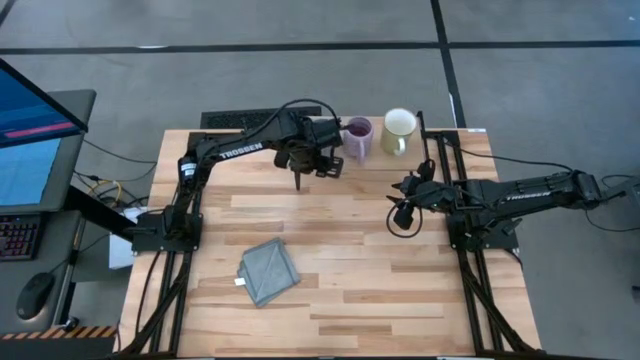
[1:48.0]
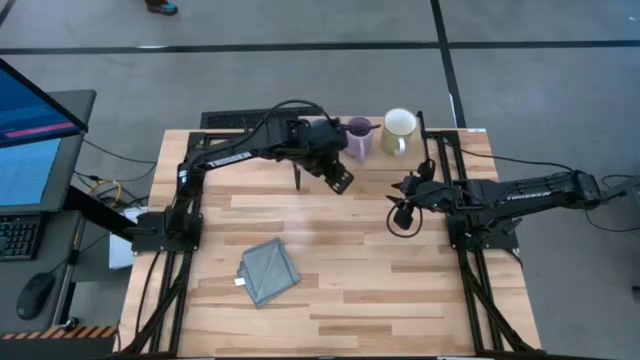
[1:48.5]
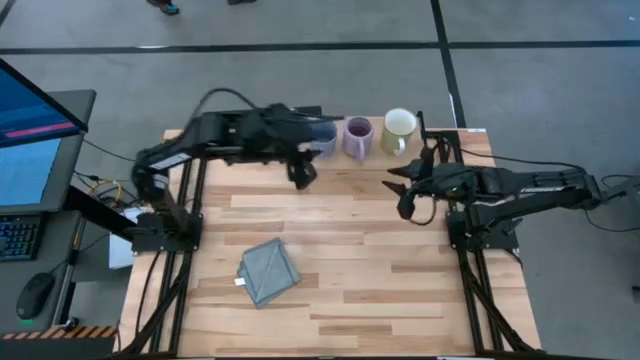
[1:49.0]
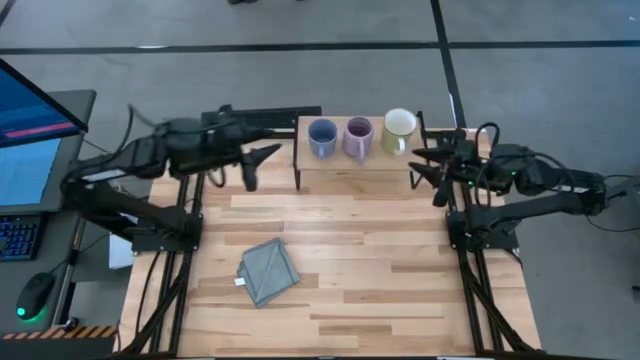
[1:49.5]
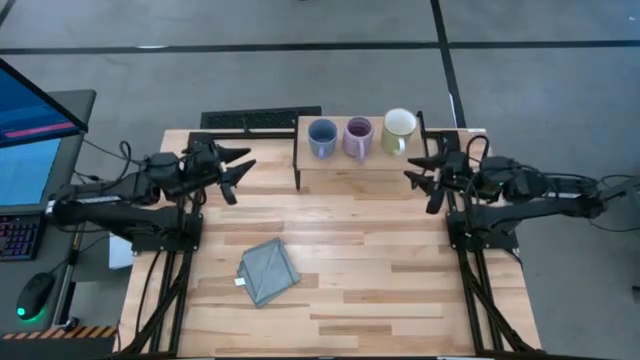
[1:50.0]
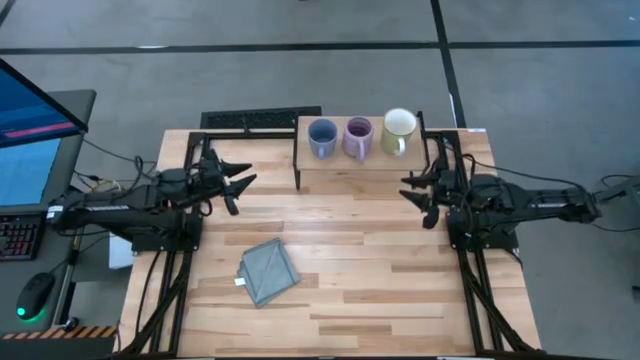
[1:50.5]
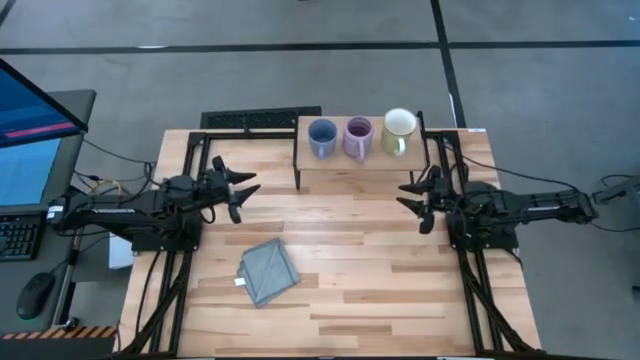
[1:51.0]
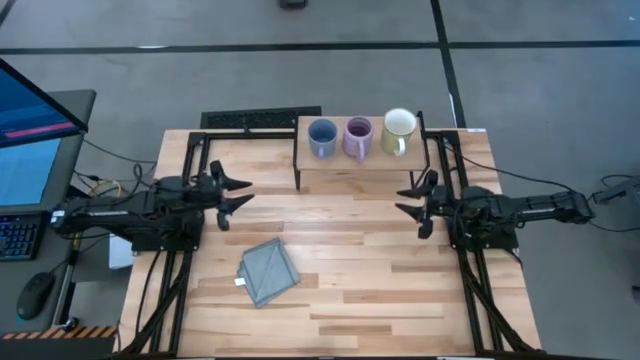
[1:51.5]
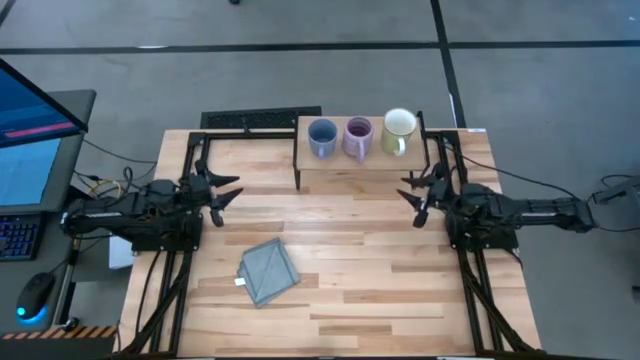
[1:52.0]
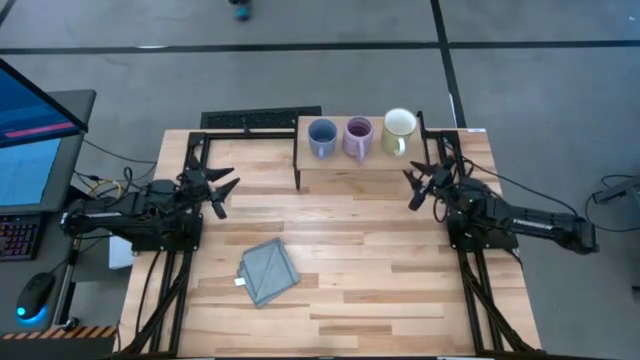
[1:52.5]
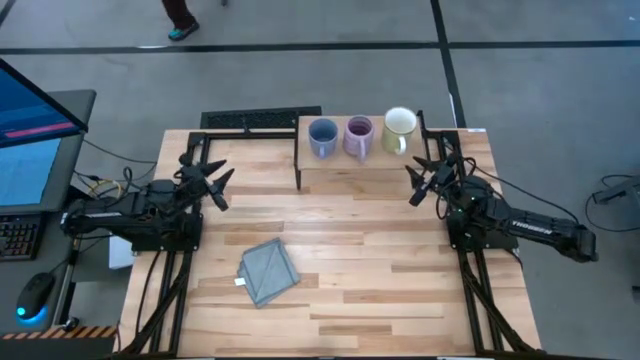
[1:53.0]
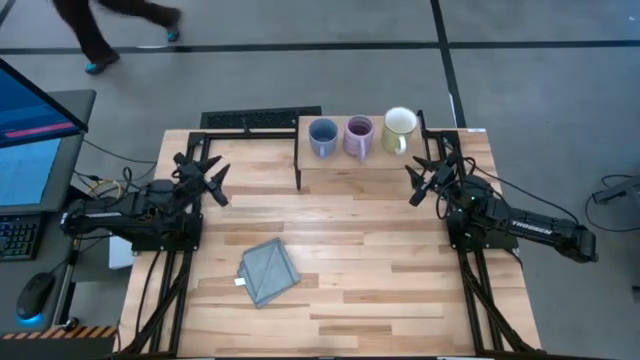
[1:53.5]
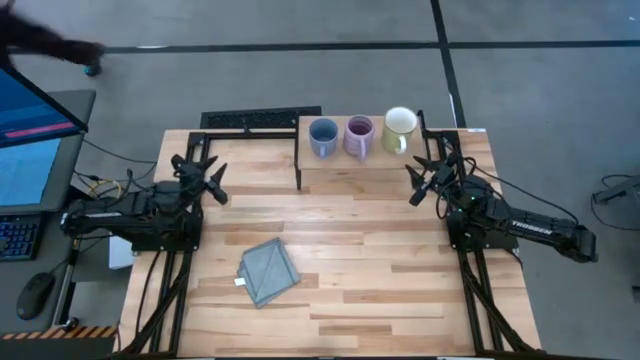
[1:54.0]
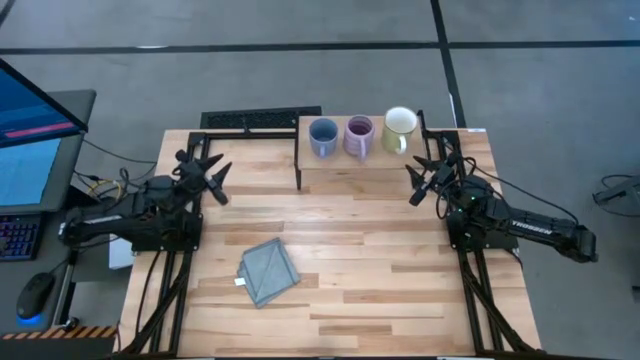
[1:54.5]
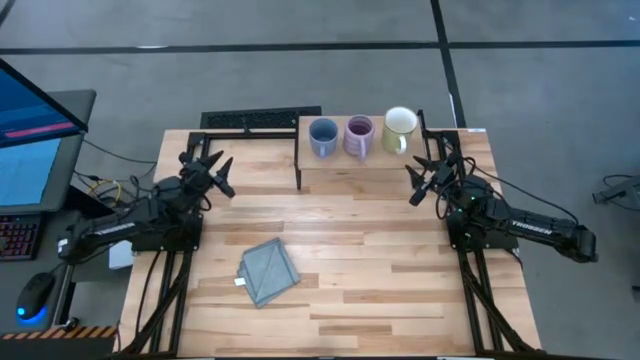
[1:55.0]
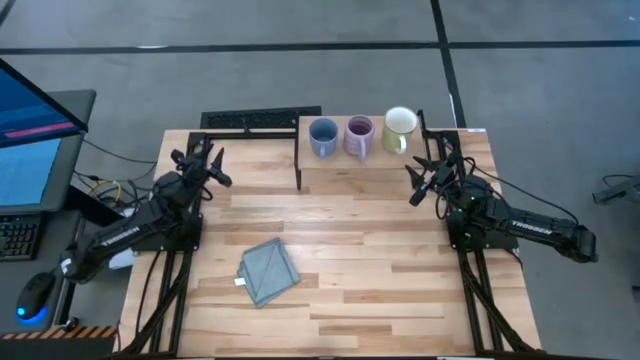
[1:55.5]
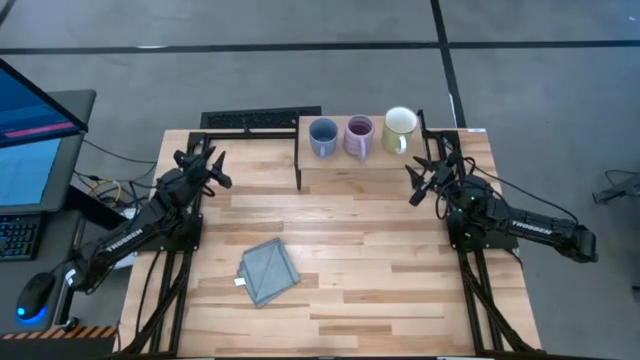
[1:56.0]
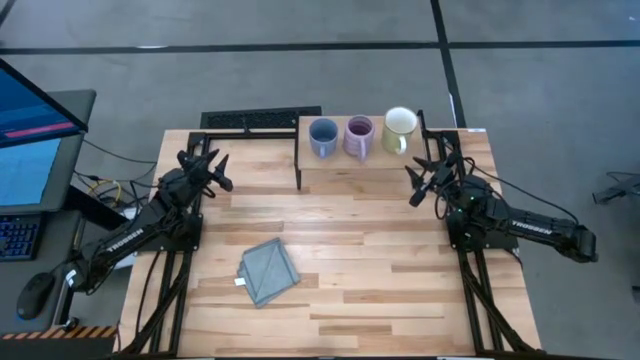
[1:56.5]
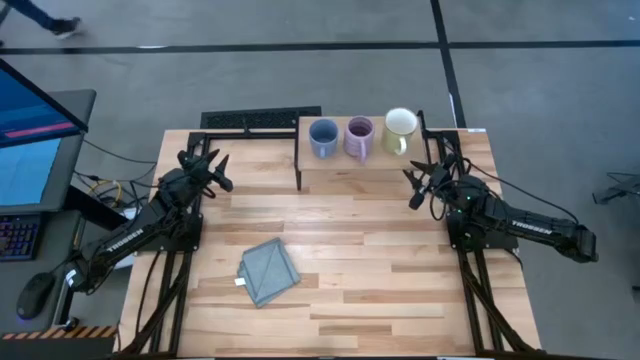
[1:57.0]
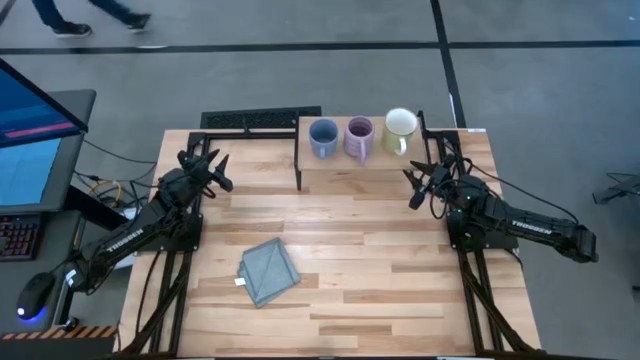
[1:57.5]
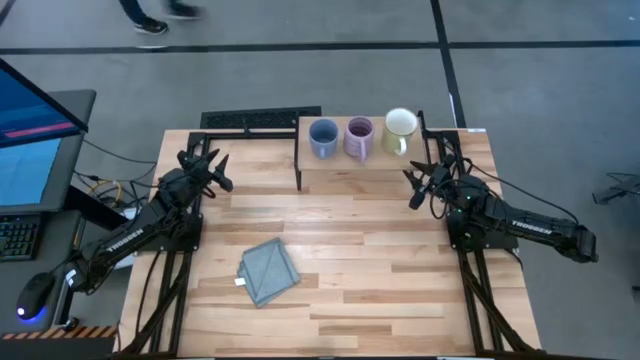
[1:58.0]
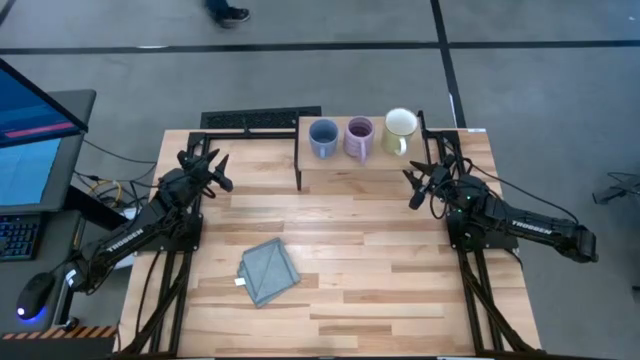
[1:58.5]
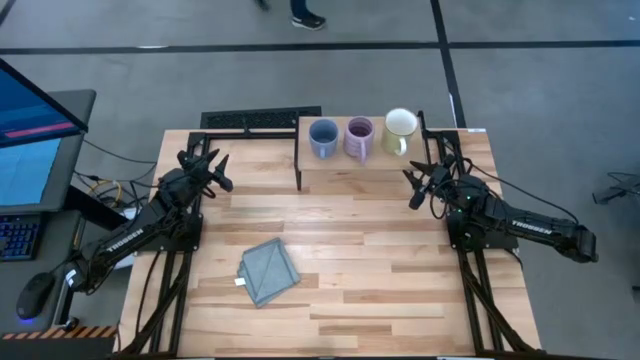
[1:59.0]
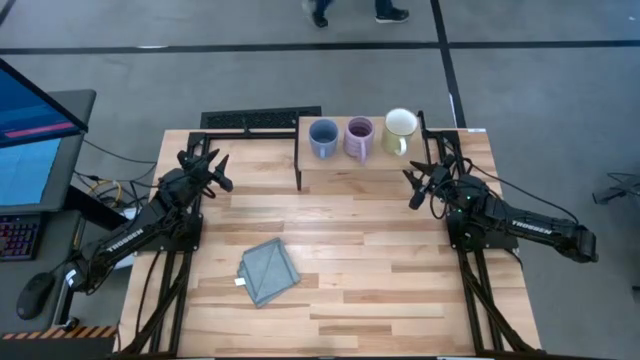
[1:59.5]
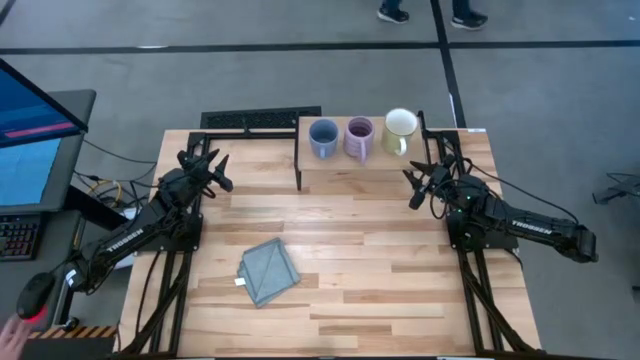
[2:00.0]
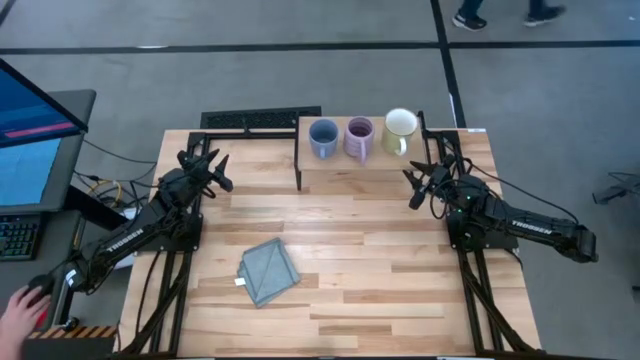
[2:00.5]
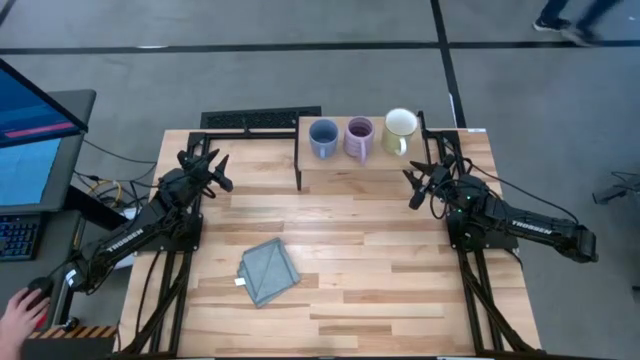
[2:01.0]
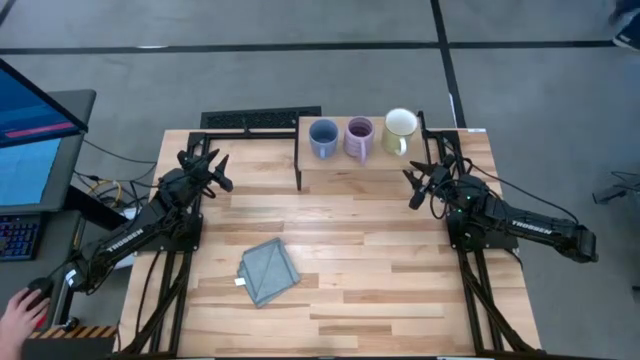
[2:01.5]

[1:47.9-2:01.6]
Task: Stack small to large cups/mugs on shelf
Return to Home Position

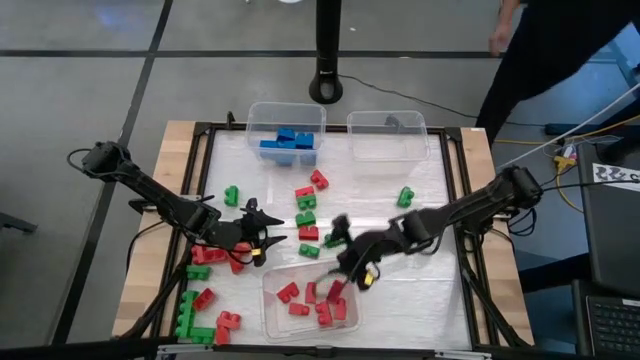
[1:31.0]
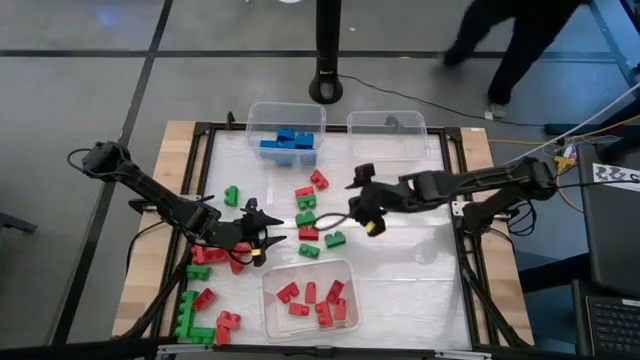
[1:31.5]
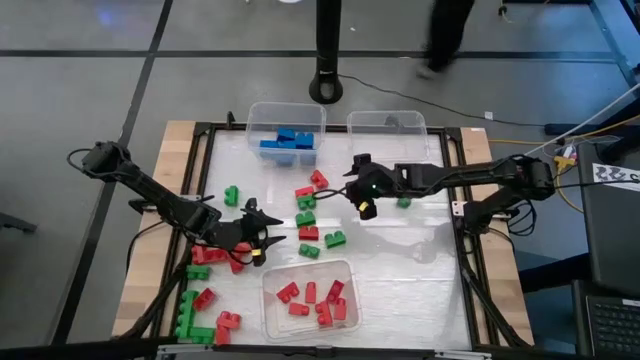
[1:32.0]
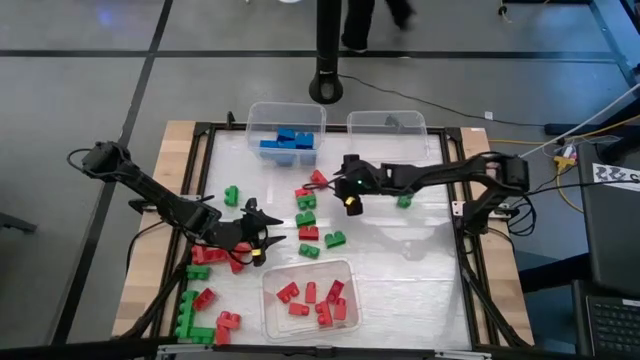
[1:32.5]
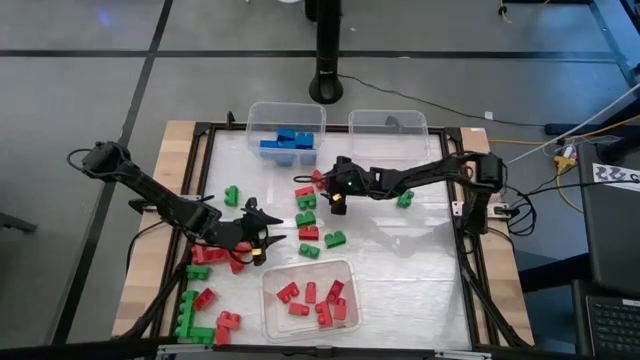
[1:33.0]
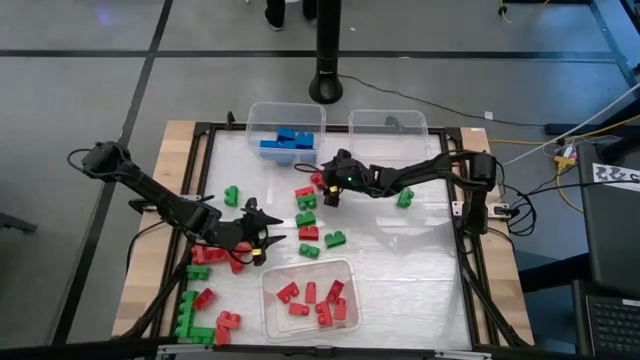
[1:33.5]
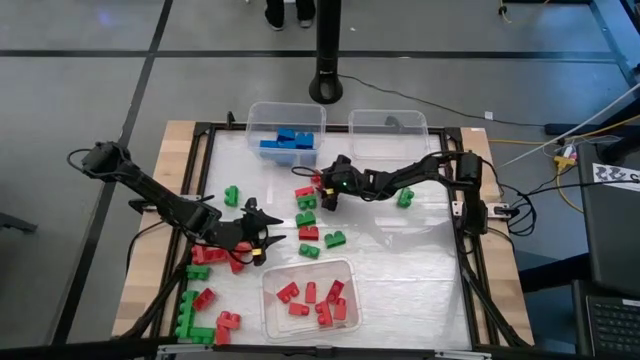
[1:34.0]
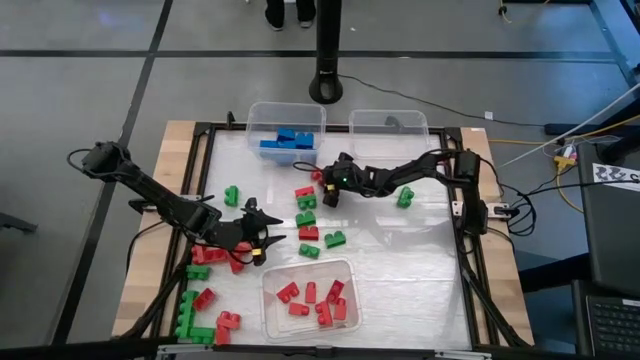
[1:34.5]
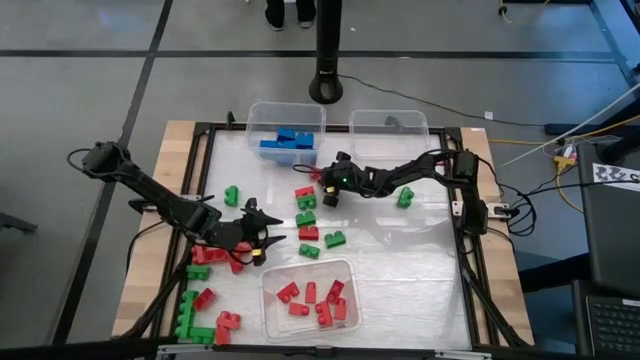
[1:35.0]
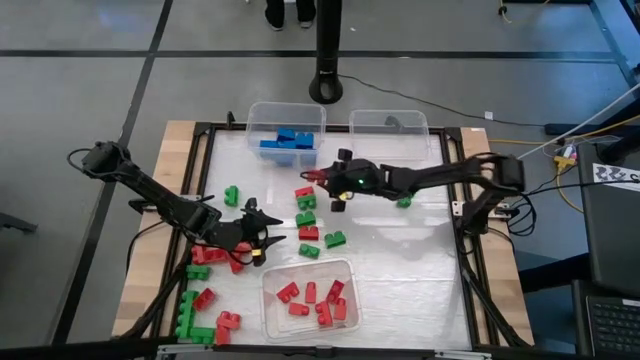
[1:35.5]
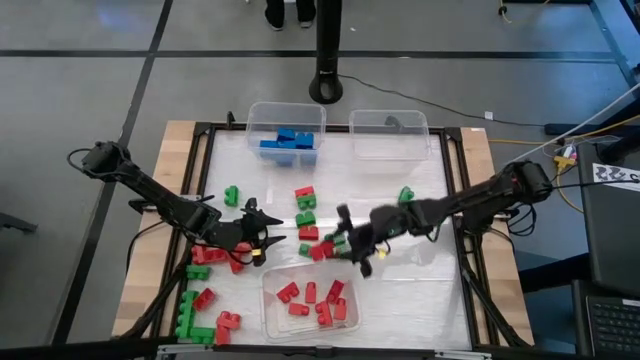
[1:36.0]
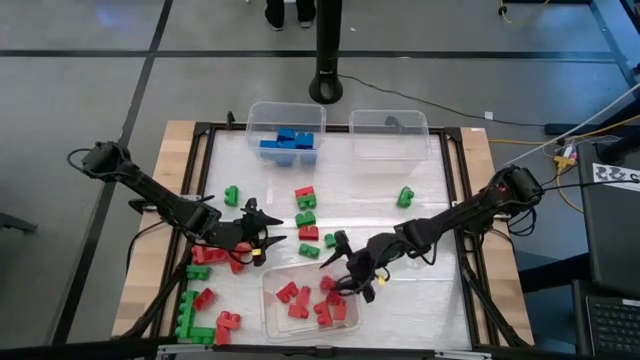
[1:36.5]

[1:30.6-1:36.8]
Task: Sort blocks
Put the red game piece into the bottom transparent bin
